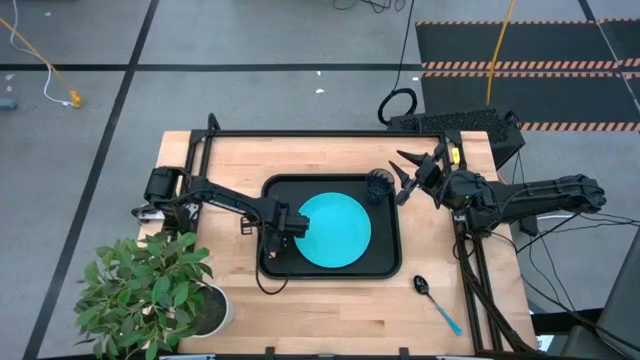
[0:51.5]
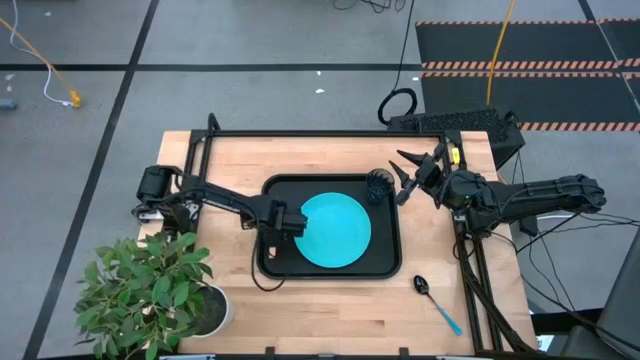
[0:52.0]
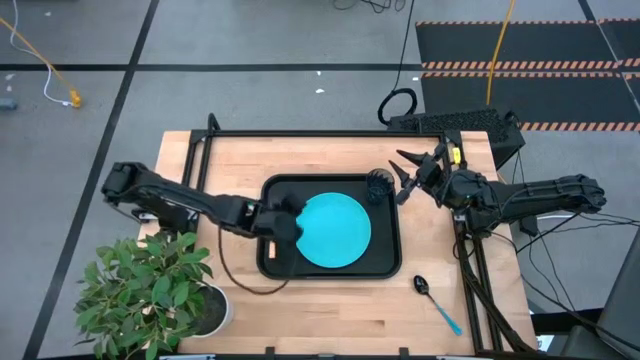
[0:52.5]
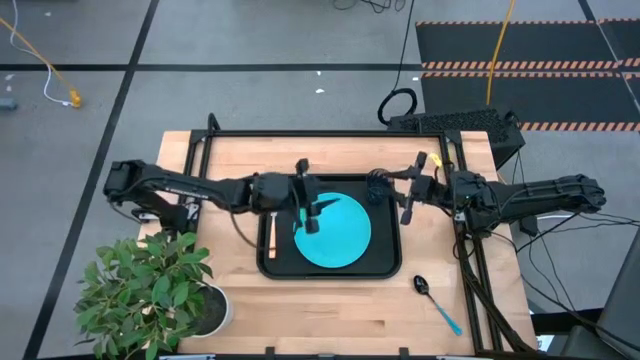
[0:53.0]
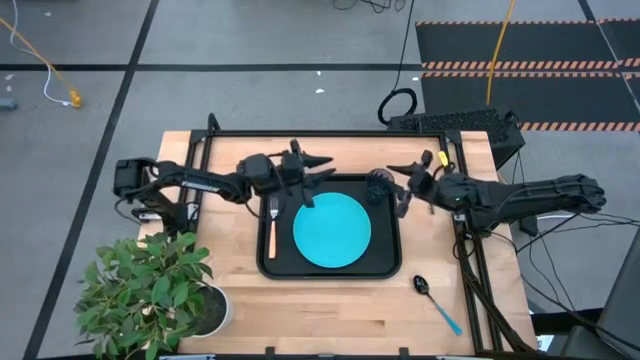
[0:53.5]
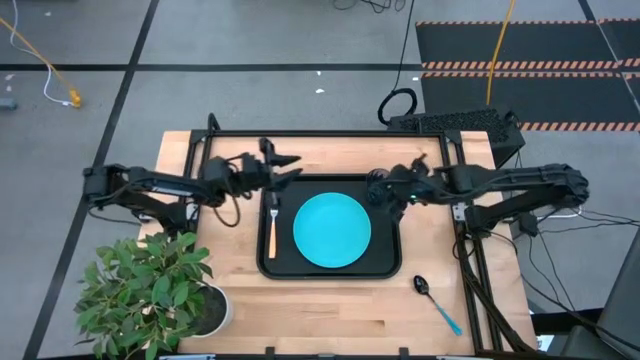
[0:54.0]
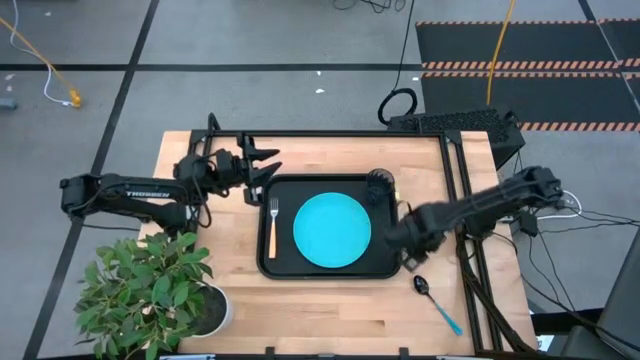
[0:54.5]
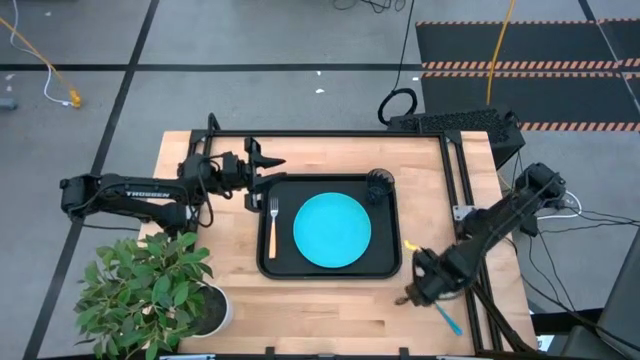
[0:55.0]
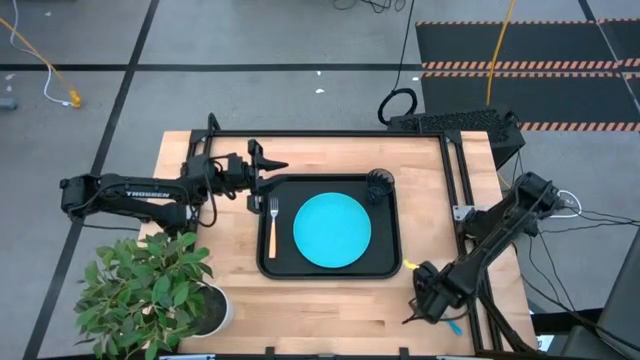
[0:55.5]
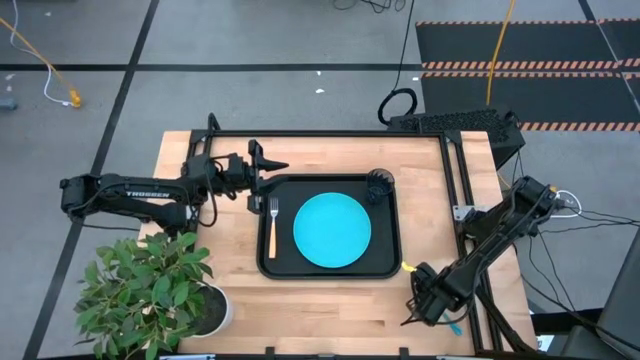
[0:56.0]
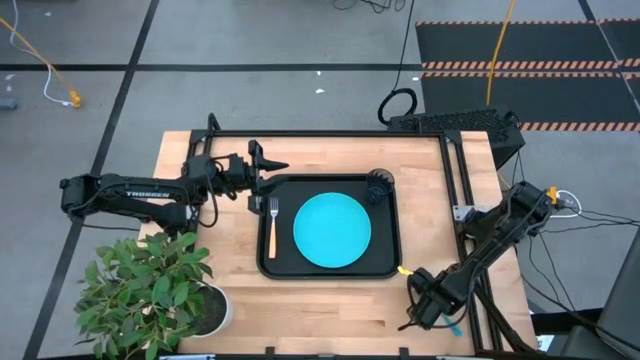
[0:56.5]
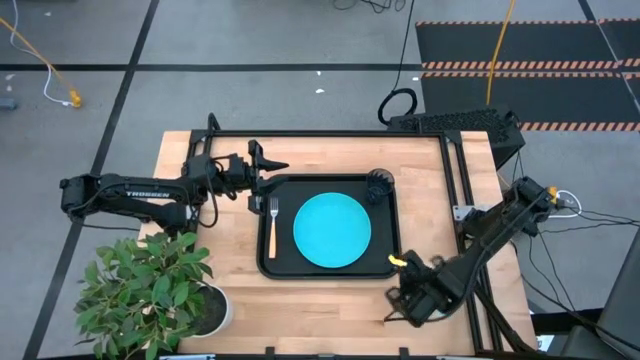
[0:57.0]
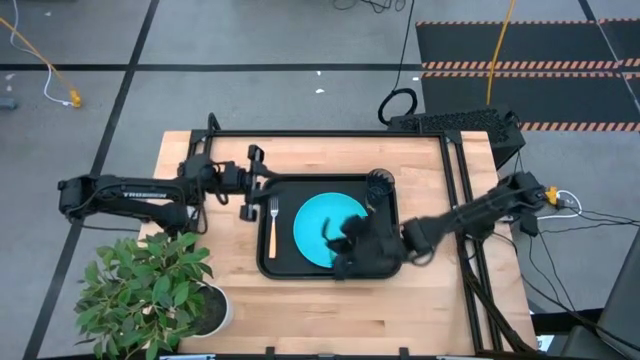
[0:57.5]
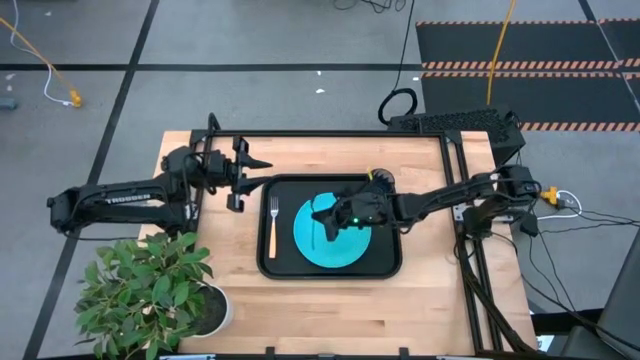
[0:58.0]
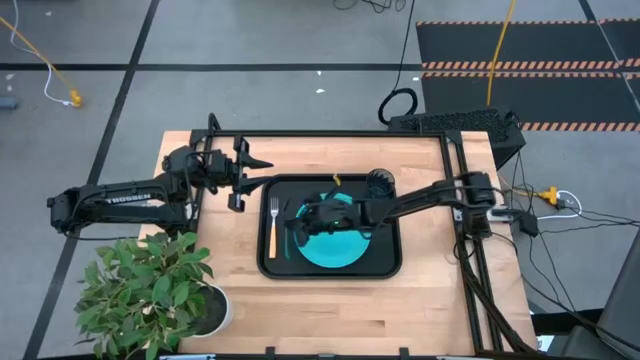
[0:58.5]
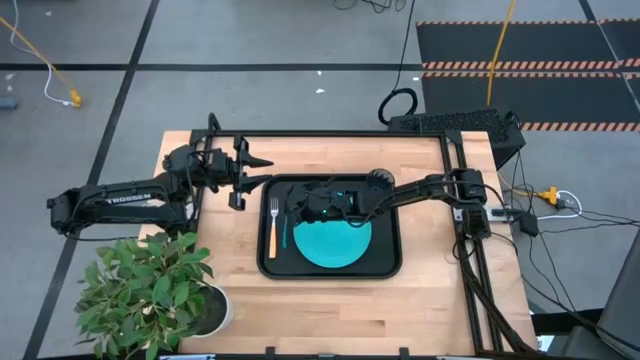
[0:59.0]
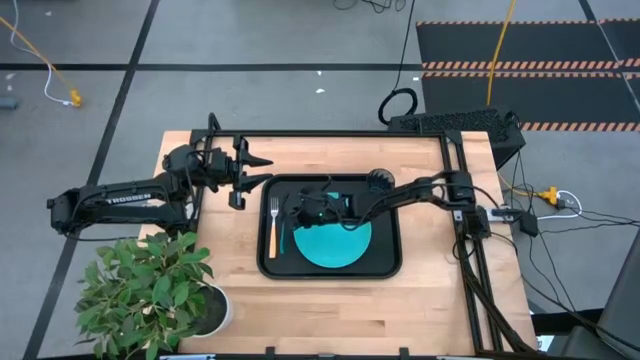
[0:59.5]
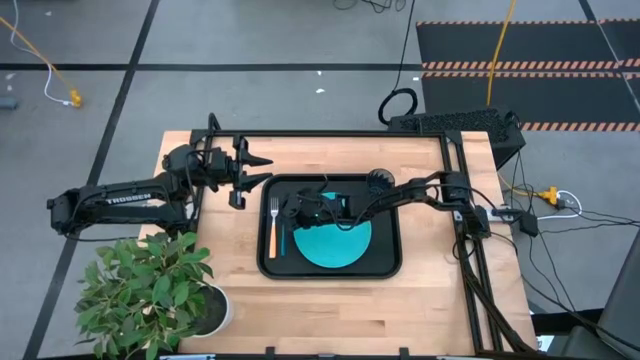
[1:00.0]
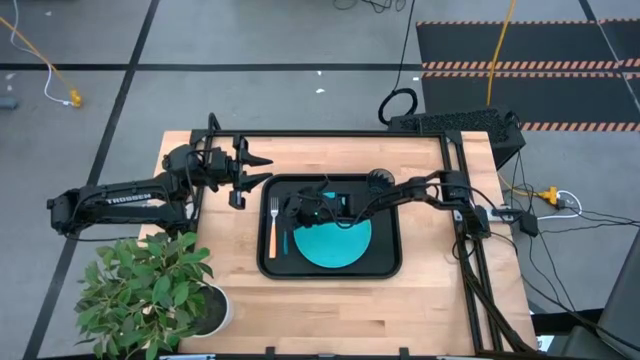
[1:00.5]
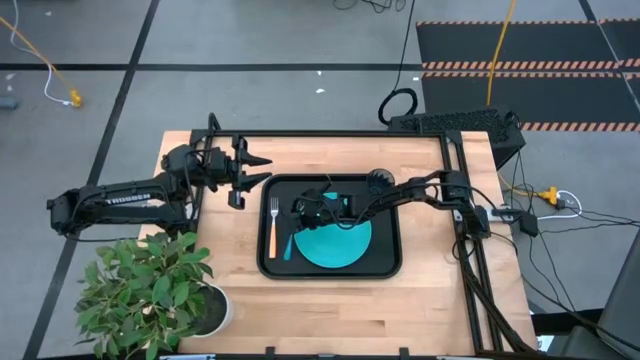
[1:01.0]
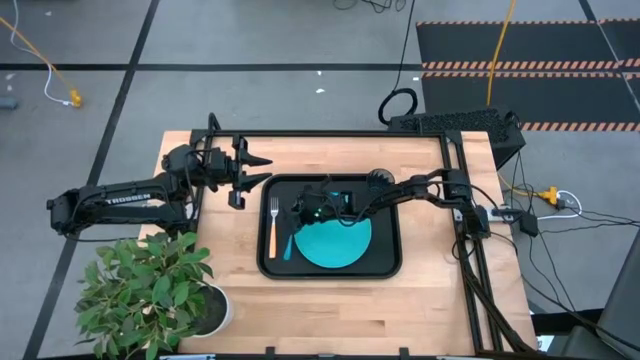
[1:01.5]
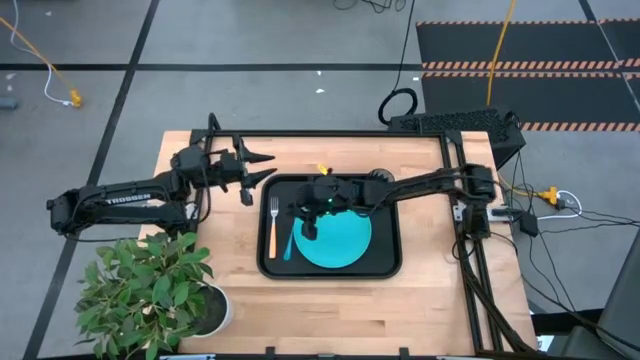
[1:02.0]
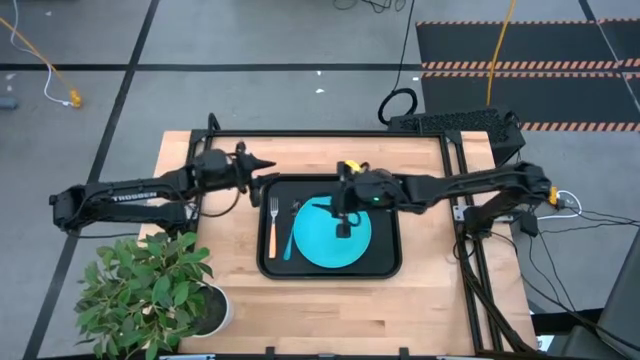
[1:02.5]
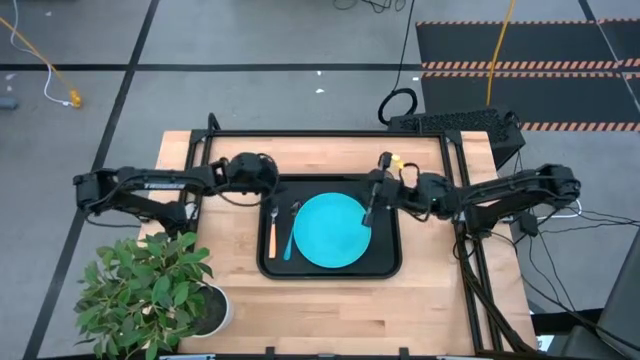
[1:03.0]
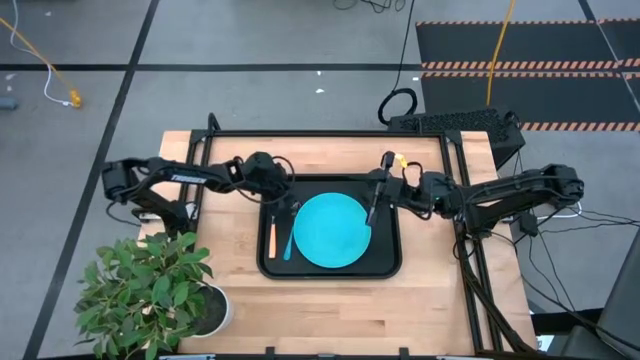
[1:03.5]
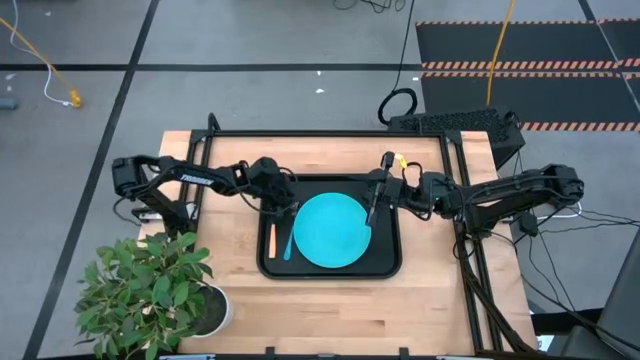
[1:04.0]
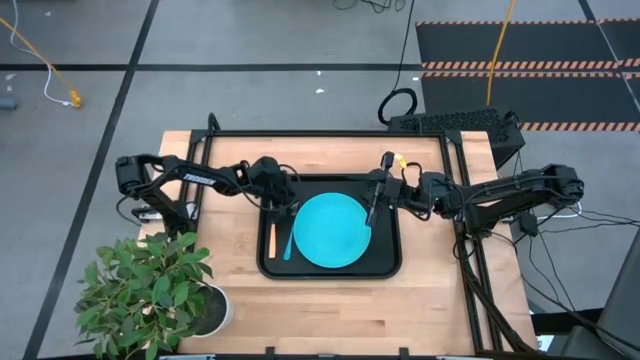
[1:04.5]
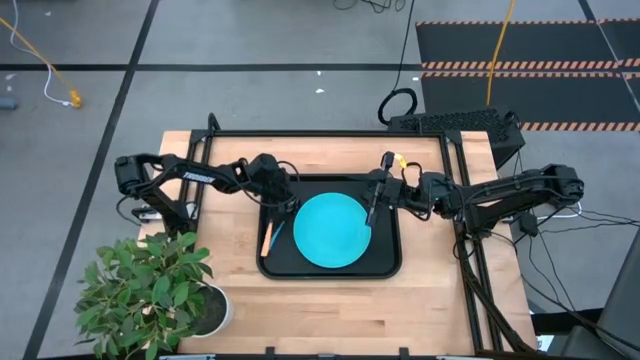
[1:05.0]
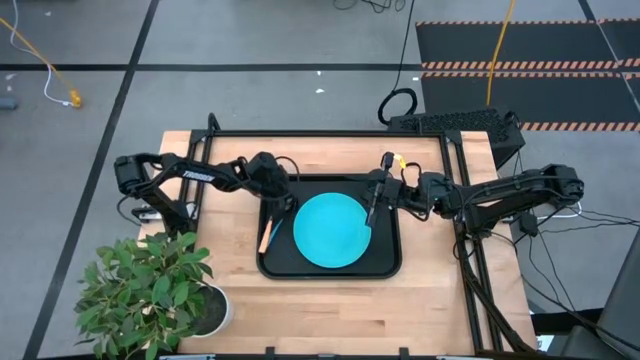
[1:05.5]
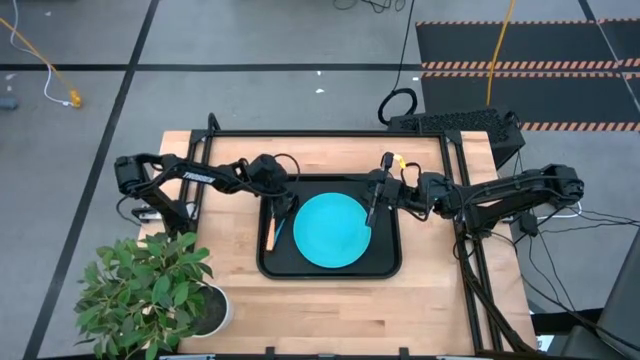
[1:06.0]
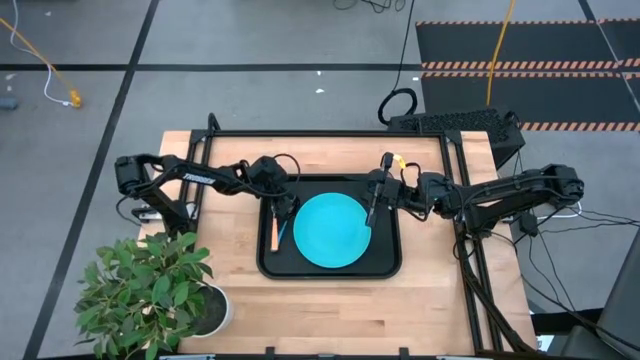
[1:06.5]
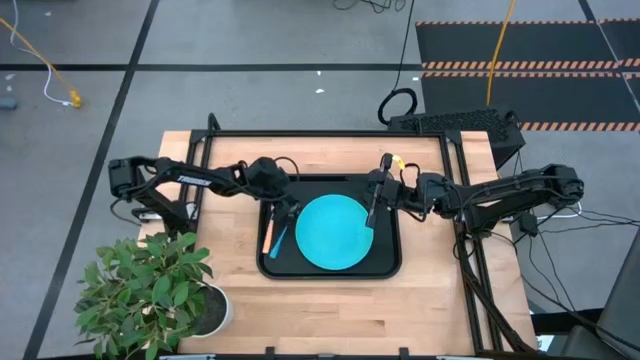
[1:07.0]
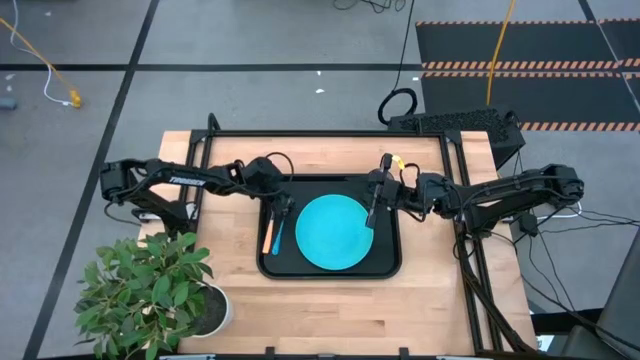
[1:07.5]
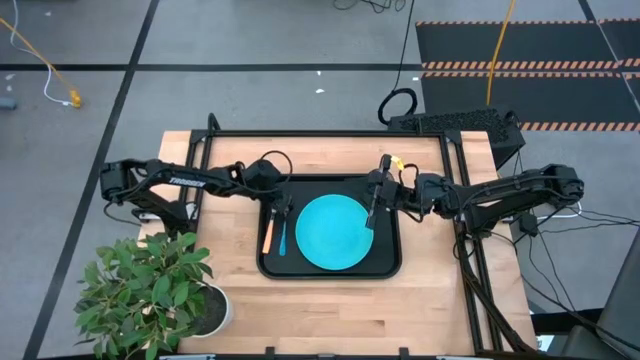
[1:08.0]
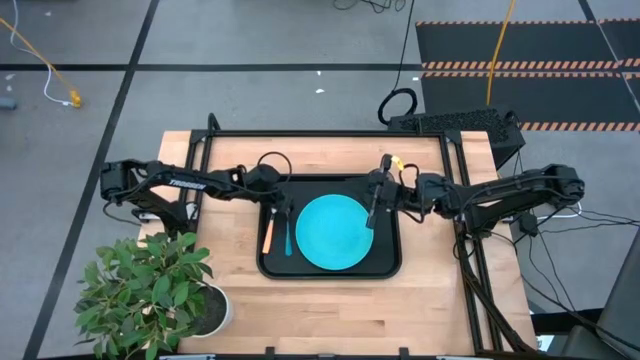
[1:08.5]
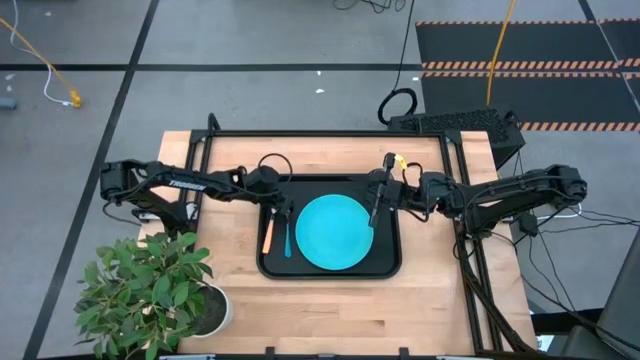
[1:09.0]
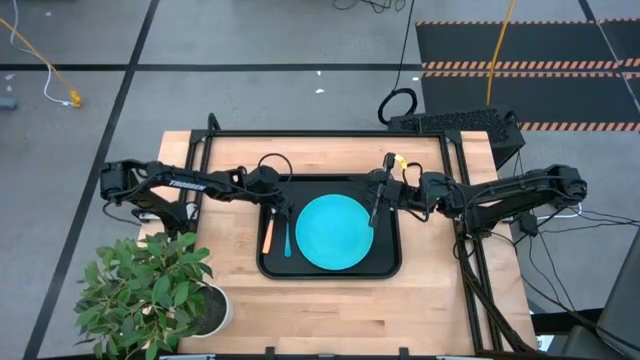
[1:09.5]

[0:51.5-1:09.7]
Task: Pick and place plate/cup/fork/spoon on tray
Put the blue spoon on the black serving tray to the right of the orange fork

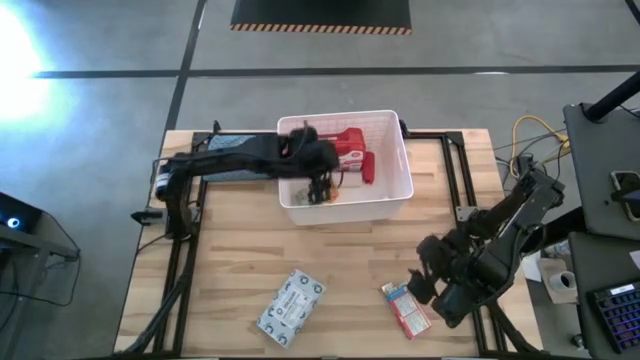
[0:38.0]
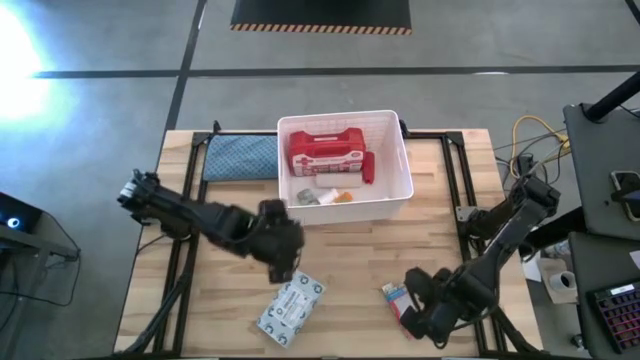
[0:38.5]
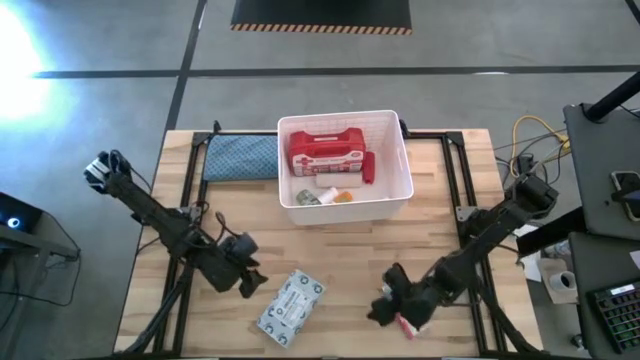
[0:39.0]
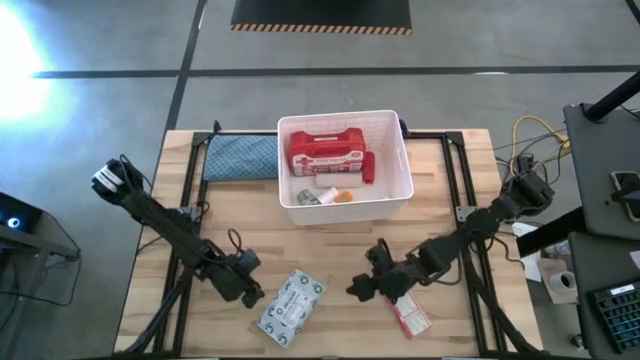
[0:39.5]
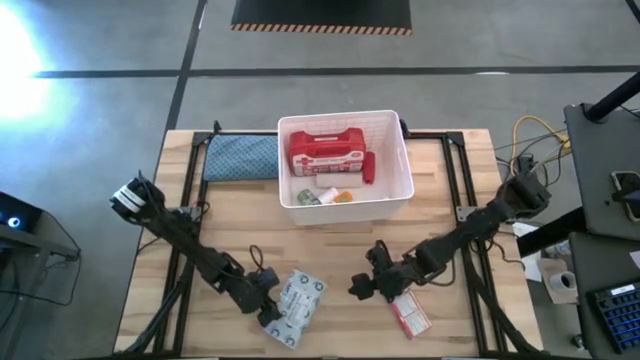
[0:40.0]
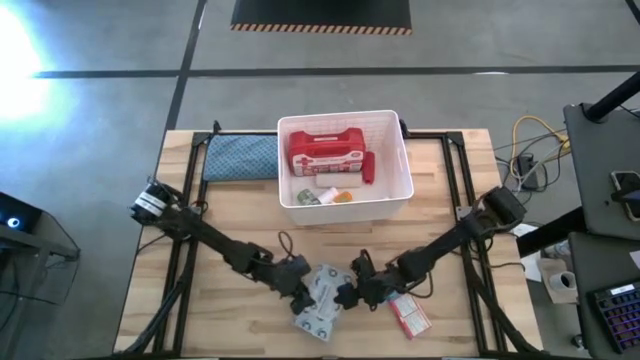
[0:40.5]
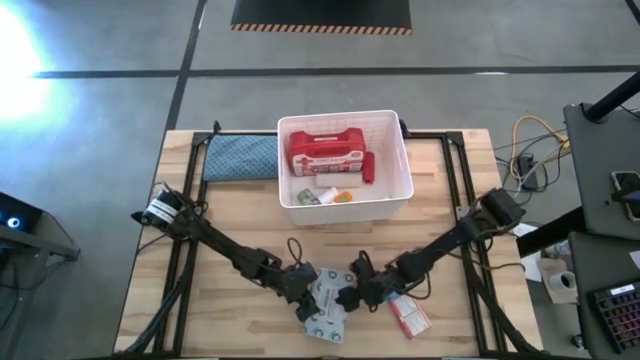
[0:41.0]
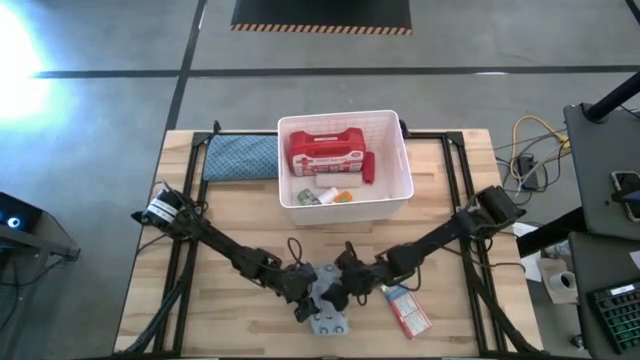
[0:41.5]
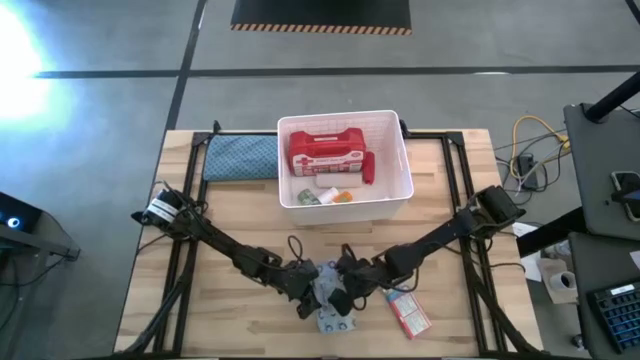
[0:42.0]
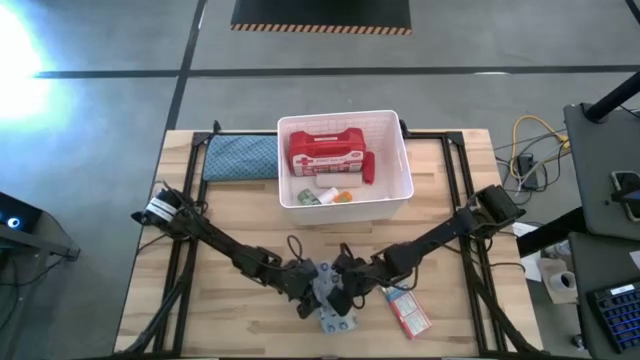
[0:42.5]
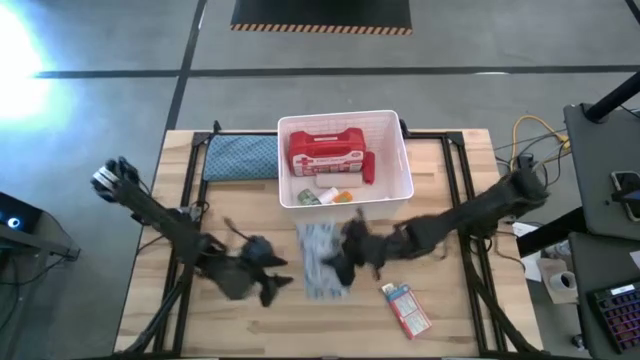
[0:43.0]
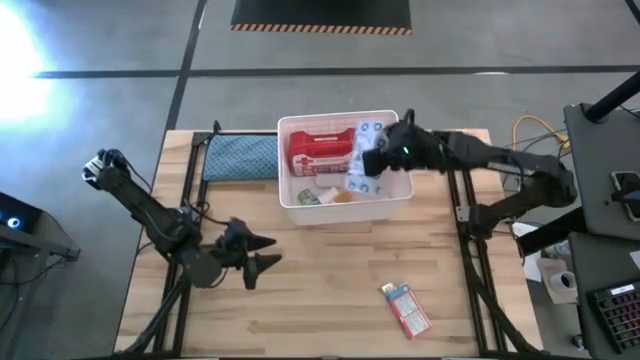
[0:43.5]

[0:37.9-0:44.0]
Task: Pick & place medical supplies in basket/bin
Put the mailer bag into the bin
